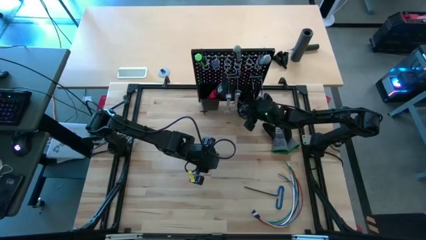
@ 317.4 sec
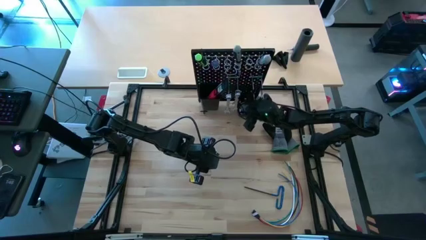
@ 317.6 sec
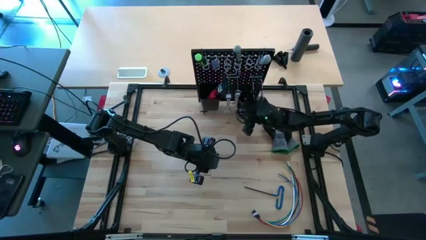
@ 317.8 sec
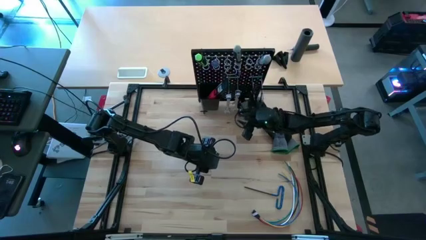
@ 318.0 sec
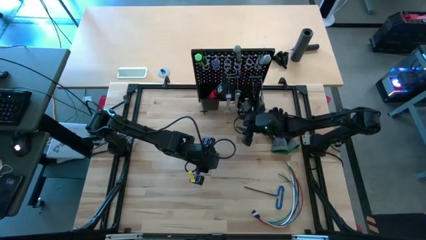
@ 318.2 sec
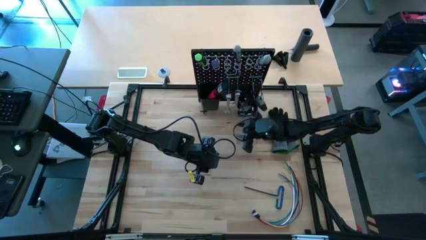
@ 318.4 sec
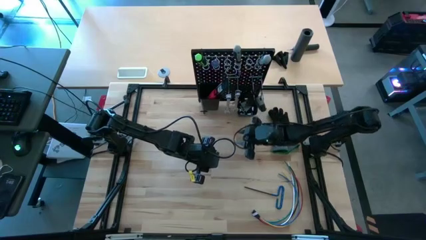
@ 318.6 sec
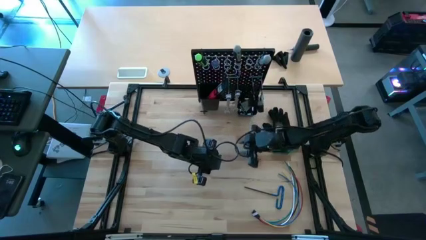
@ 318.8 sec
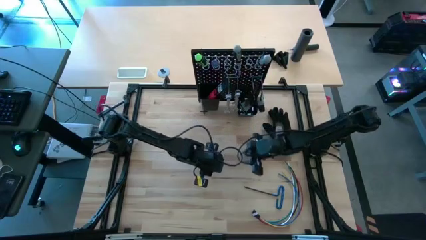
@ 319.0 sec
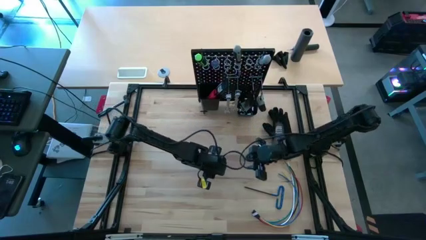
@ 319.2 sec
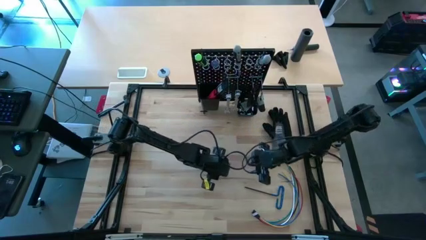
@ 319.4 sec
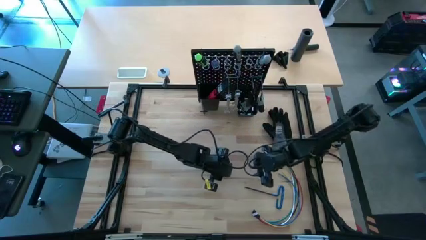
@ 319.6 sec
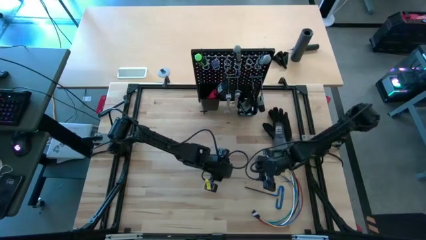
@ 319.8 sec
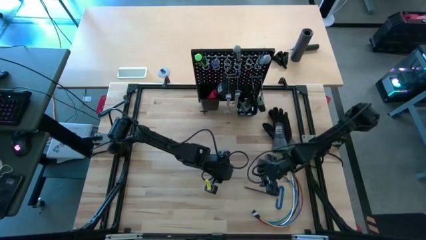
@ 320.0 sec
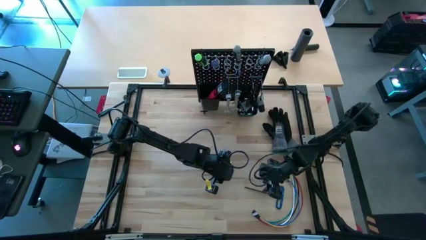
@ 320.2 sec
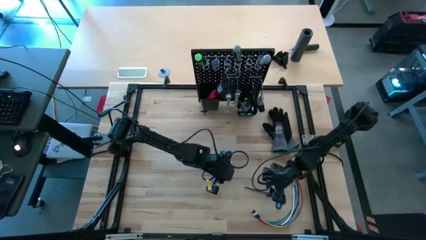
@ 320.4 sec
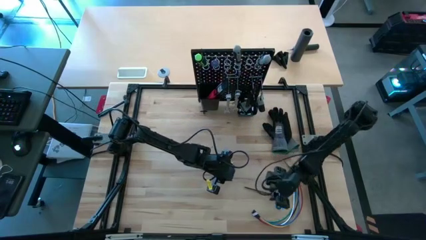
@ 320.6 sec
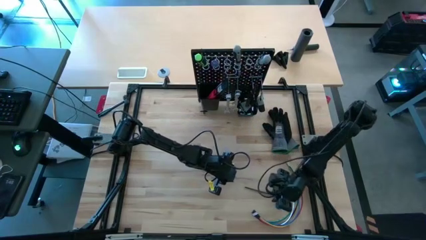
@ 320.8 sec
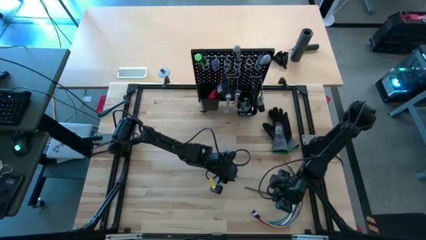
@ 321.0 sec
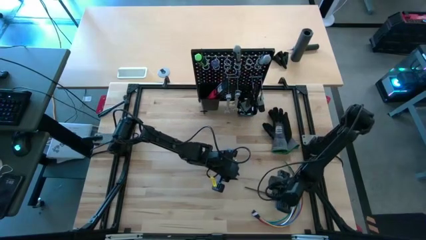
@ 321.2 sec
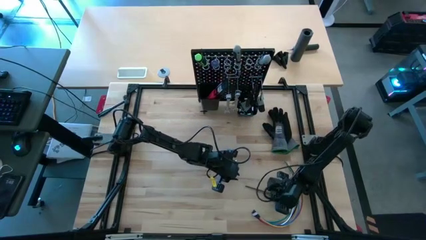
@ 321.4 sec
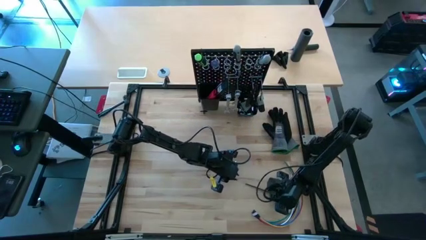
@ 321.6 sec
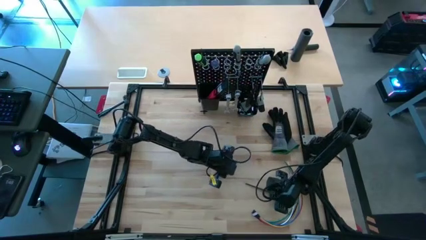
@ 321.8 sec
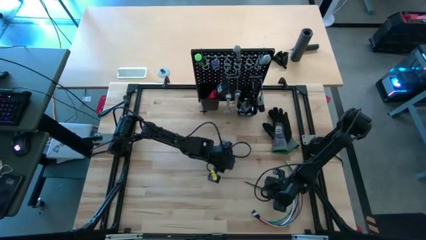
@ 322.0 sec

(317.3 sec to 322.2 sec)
Task: Hang tools onto peg board
Put the blue pick tool on the left black bin on the peg board

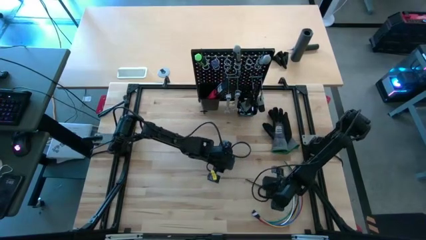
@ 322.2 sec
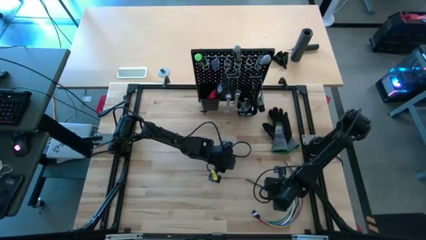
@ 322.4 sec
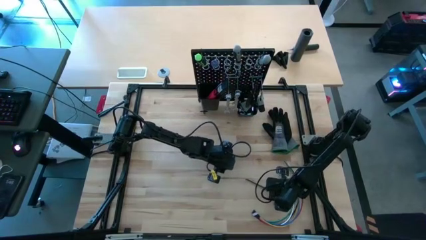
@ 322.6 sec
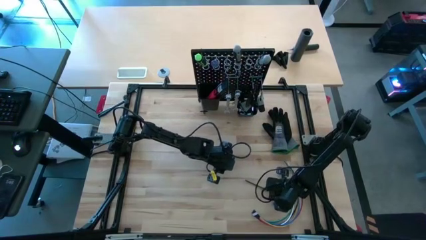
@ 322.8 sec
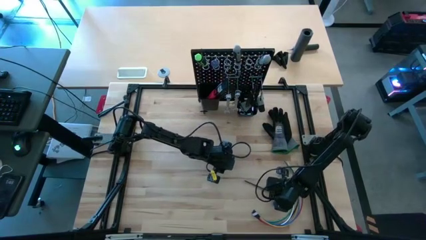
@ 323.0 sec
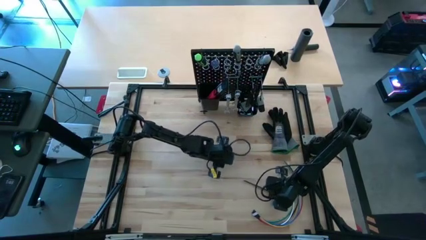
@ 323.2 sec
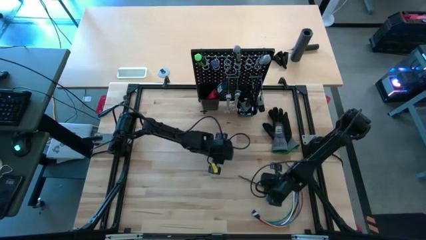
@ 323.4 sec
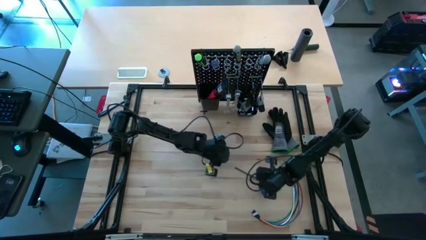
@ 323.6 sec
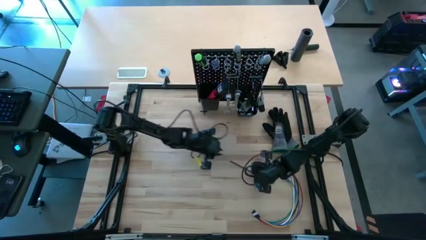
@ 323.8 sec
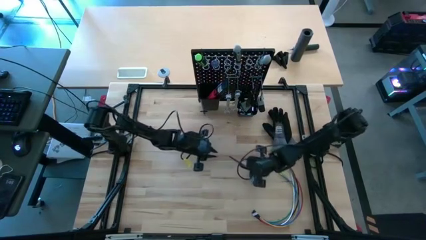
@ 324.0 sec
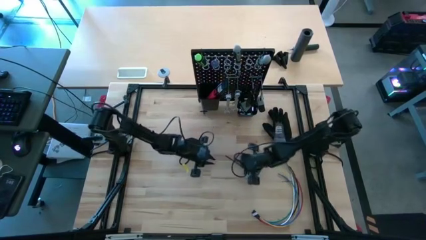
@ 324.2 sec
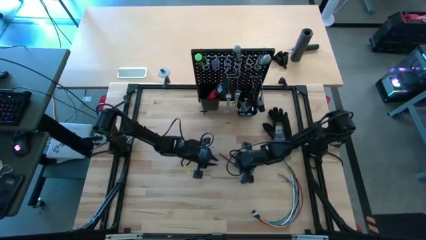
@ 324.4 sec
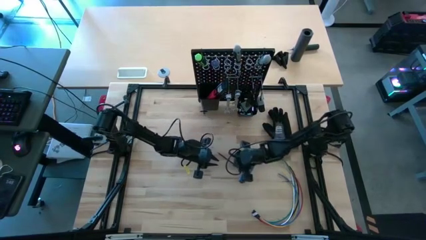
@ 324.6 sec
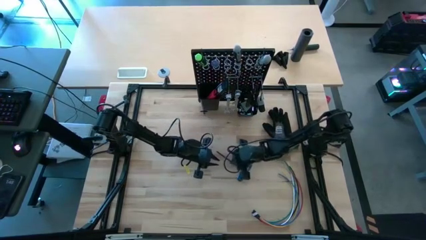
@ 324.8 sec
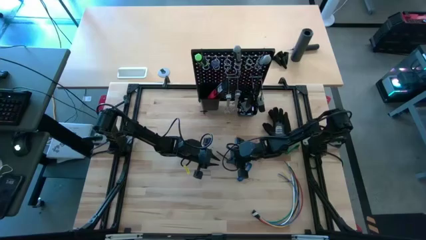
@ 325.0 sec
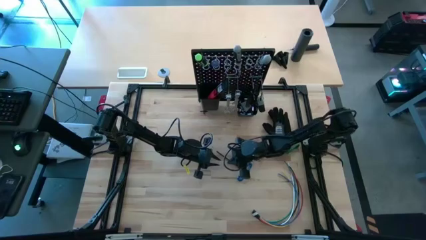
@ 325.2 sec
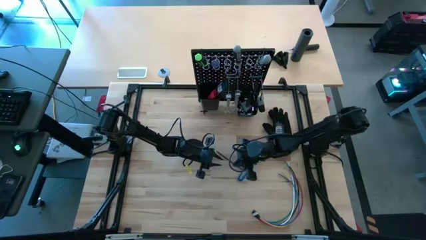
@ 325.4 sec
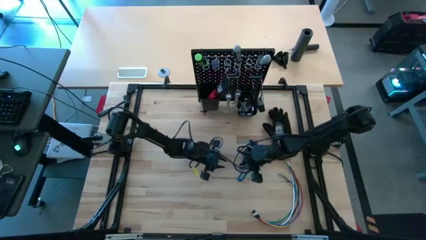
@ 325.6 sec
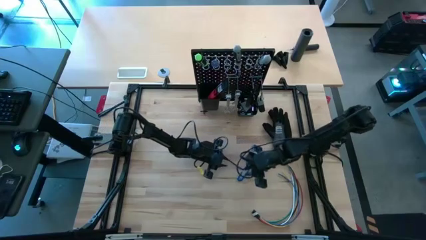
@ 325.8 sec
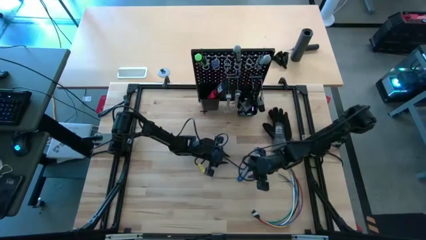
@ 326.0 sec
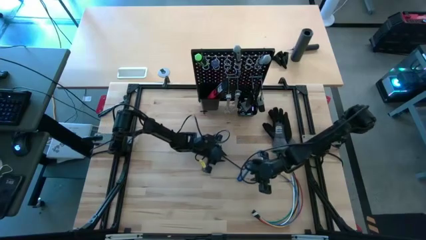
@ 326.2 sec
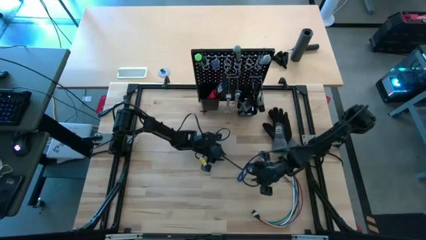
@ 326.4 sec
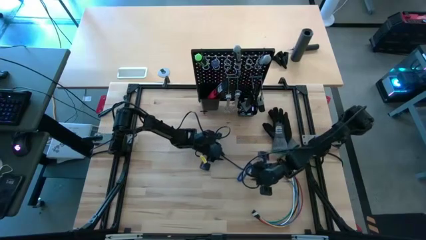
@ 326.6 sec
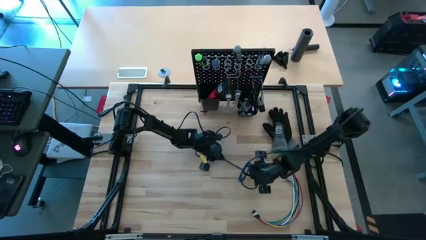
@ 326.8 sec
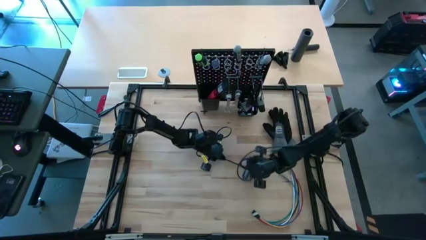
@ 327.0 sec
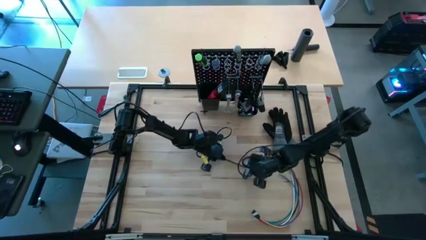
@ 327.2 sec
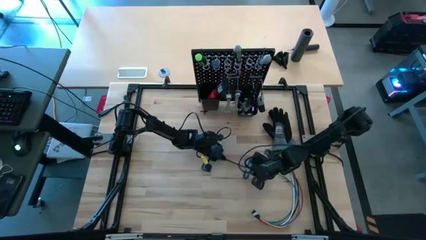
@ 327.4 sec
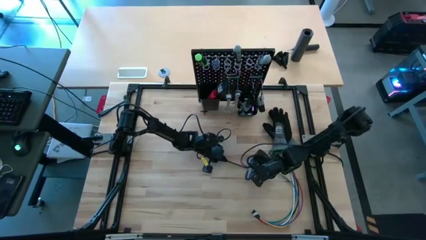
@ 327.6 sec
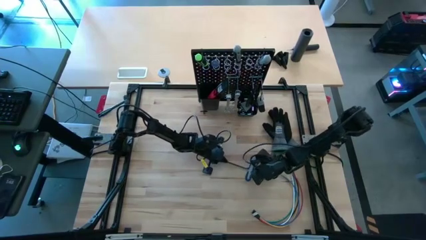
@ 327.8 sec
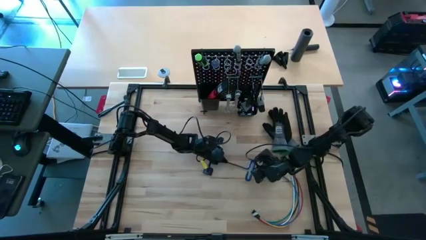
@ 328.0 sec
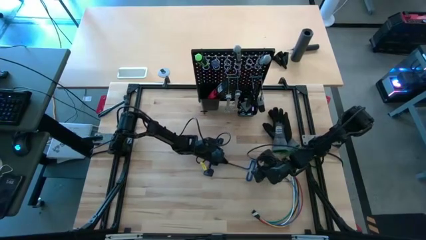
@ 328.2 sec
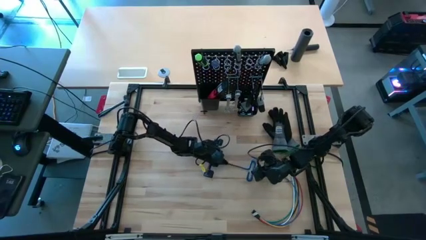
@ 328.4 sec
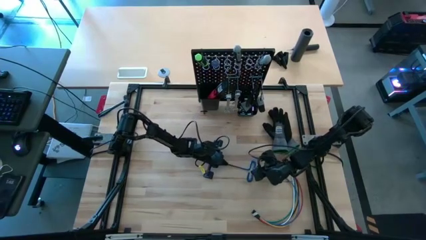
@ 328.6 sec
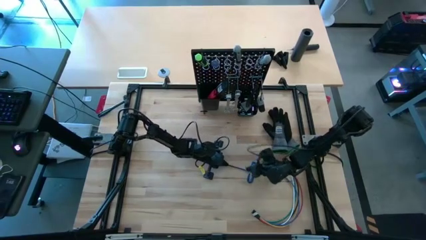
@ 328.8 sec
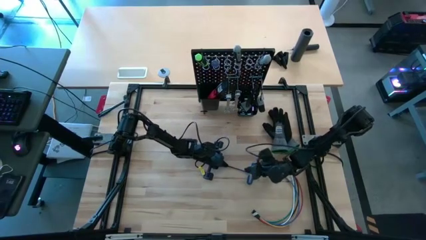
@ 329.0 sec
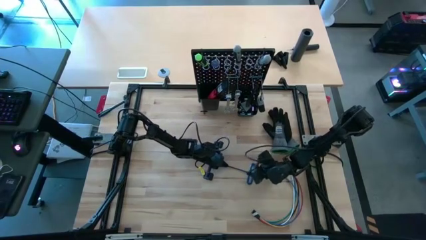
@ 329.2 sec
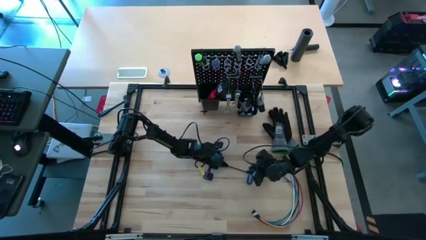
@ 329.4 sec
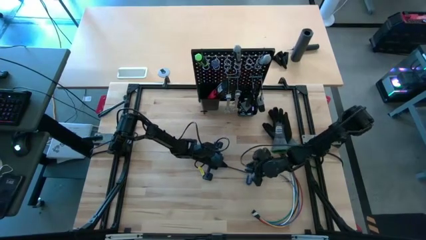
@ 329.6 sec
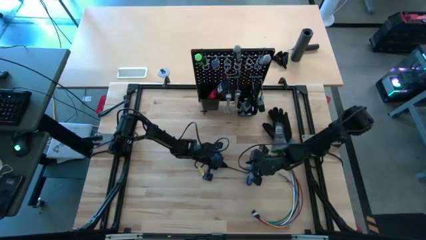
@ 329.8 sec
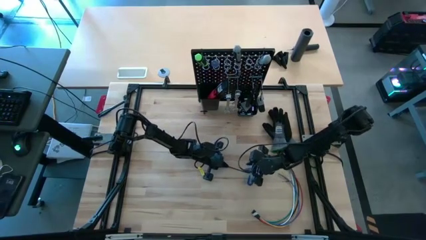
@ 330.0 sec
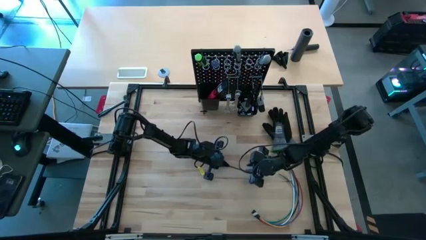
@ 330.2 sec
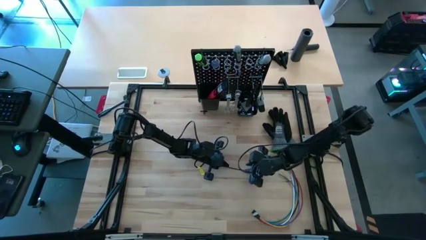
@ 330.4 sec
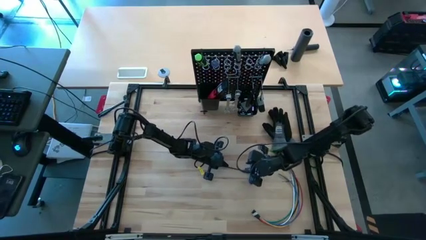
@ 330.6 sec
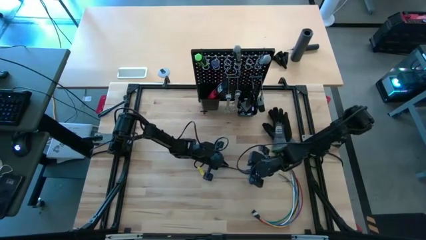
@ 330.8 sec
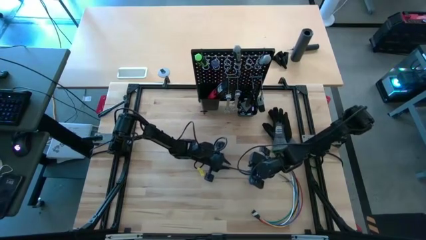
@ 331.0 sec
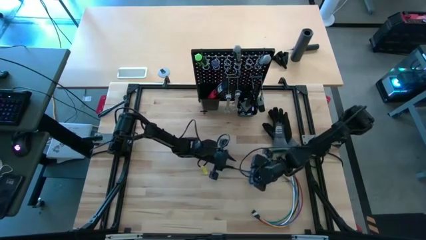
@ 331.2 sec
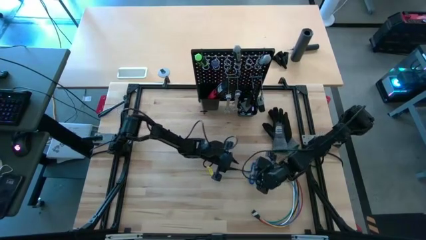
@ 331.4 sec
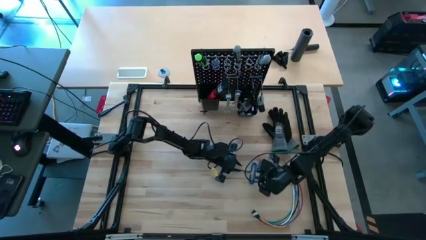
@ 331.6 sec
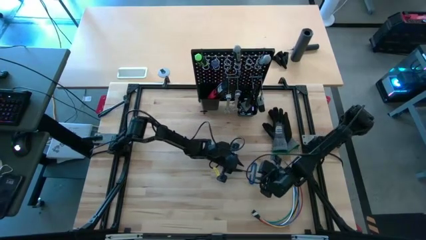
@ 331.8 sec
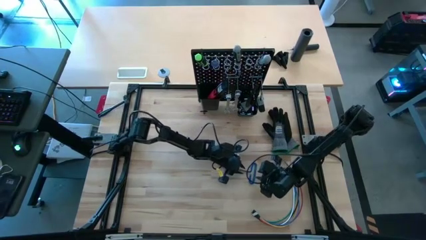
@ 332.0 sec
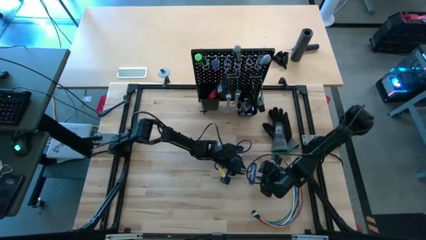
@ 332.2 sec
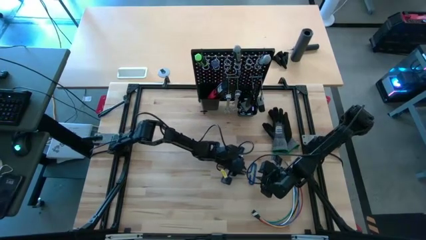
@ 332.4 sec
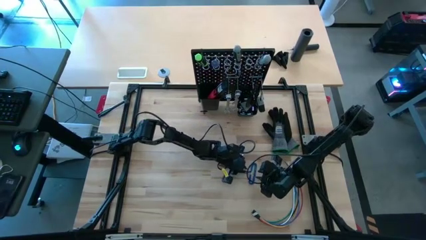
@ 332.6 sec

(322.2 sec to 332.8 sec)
Put the blue pick tool on the left black bin on the peg board
